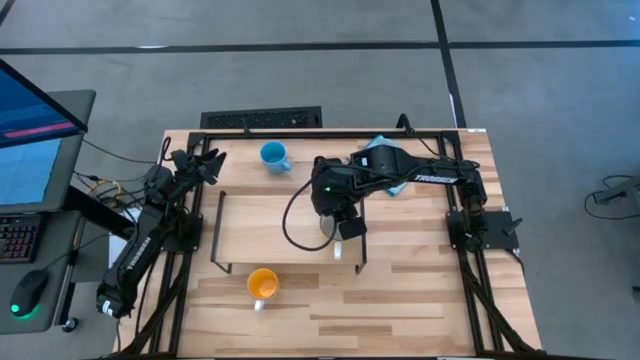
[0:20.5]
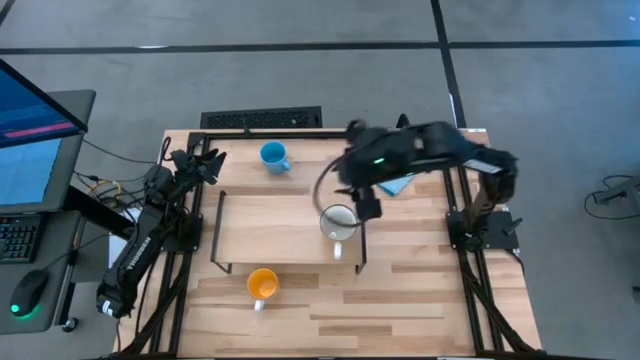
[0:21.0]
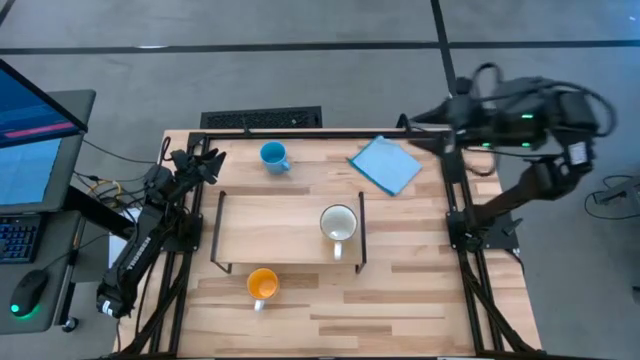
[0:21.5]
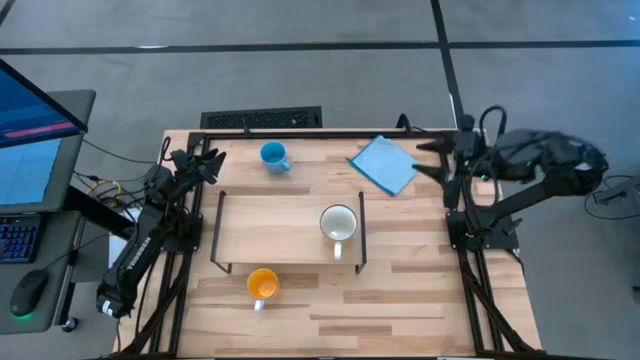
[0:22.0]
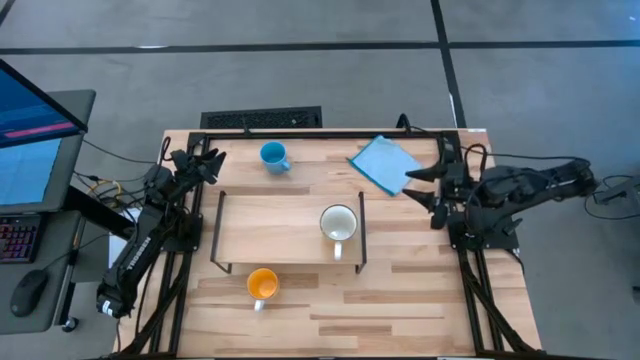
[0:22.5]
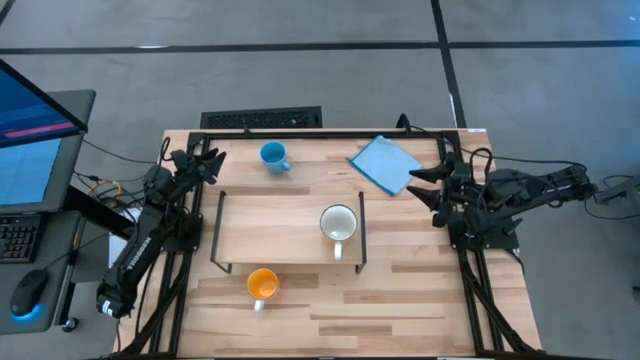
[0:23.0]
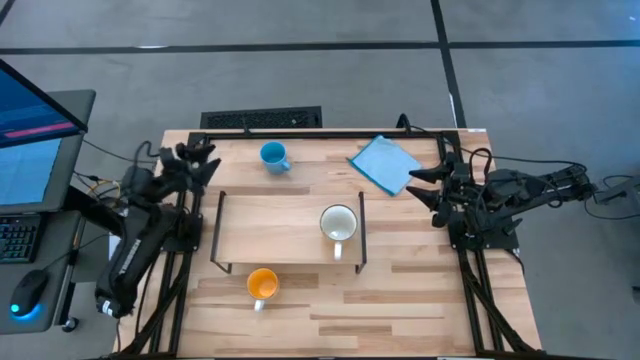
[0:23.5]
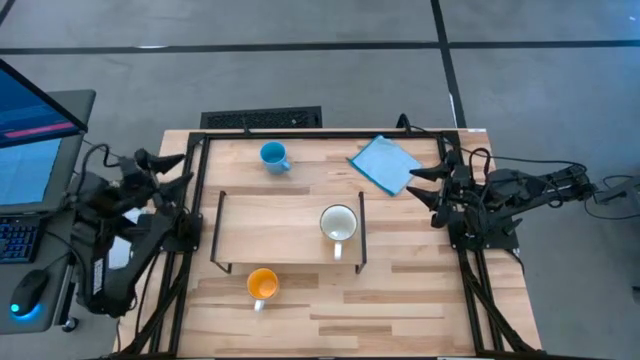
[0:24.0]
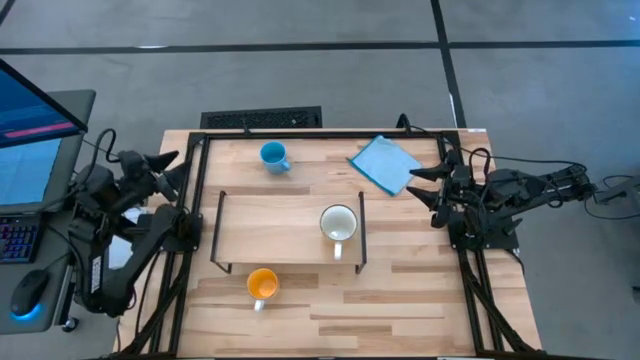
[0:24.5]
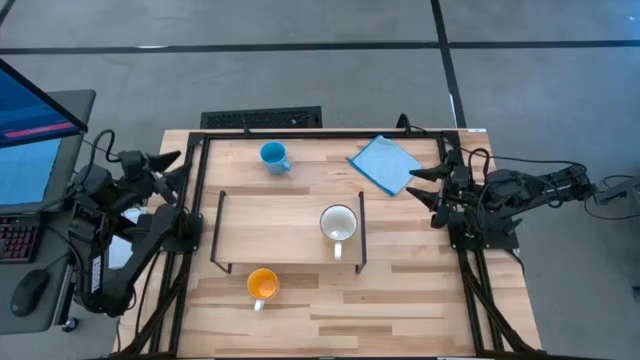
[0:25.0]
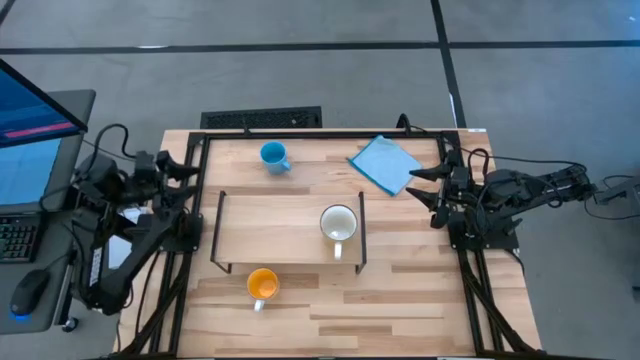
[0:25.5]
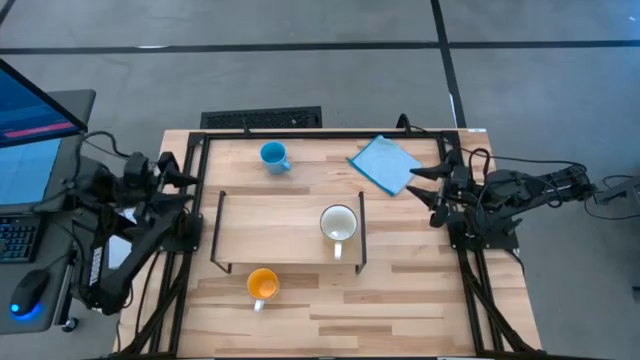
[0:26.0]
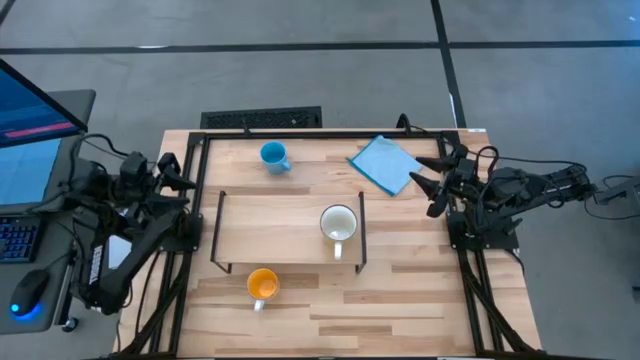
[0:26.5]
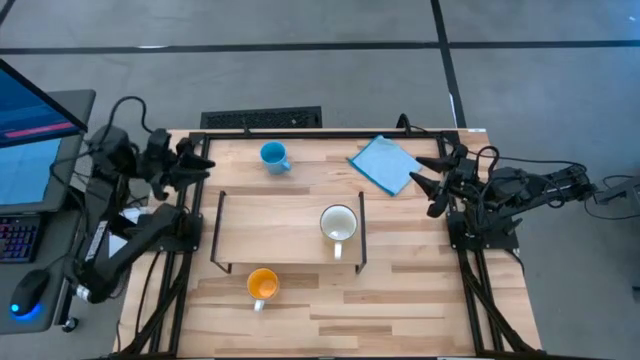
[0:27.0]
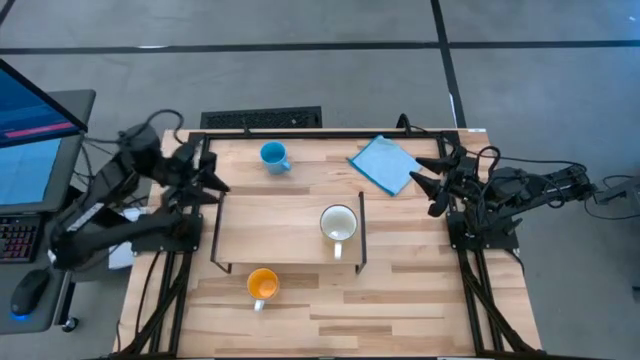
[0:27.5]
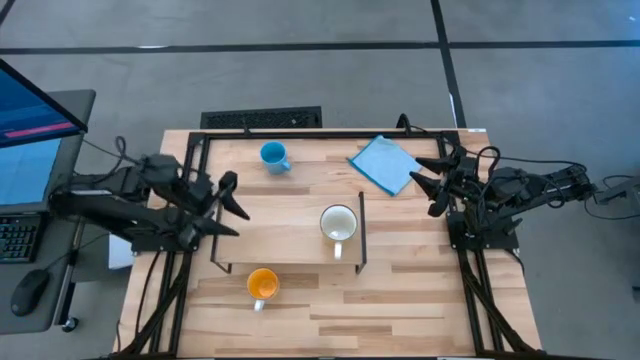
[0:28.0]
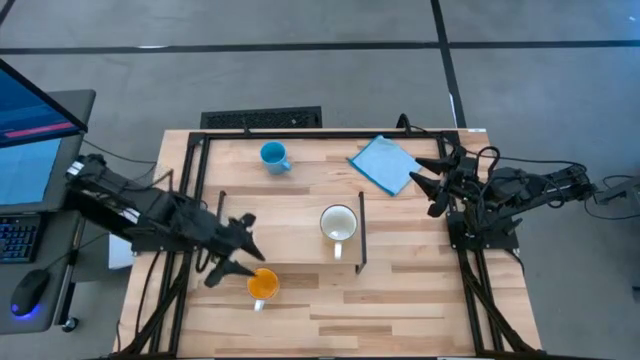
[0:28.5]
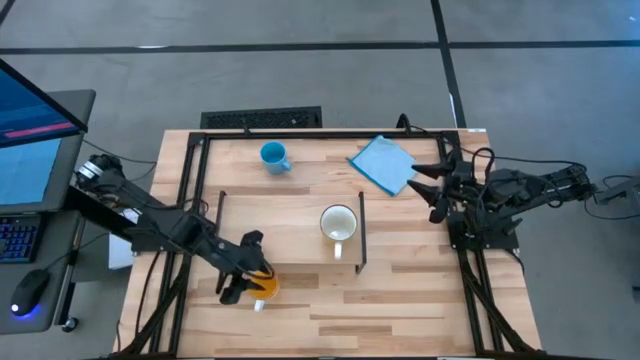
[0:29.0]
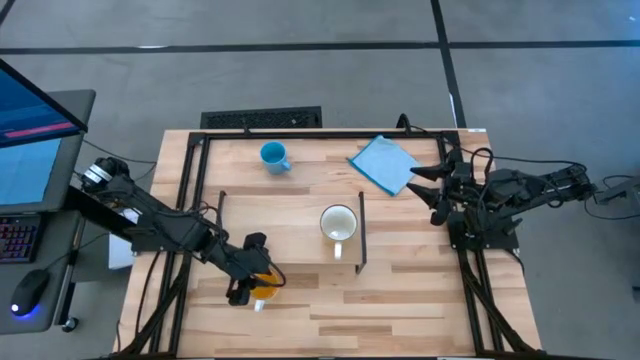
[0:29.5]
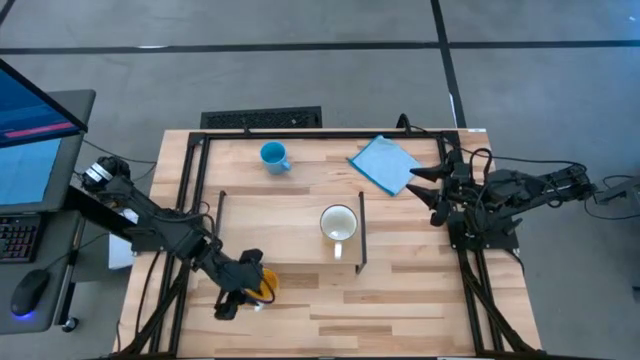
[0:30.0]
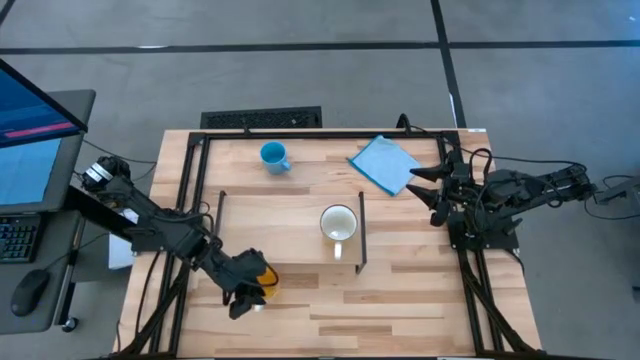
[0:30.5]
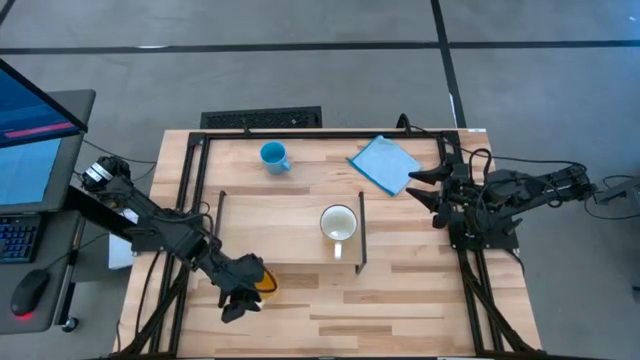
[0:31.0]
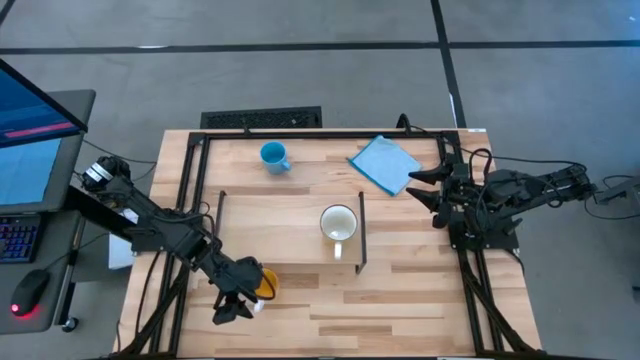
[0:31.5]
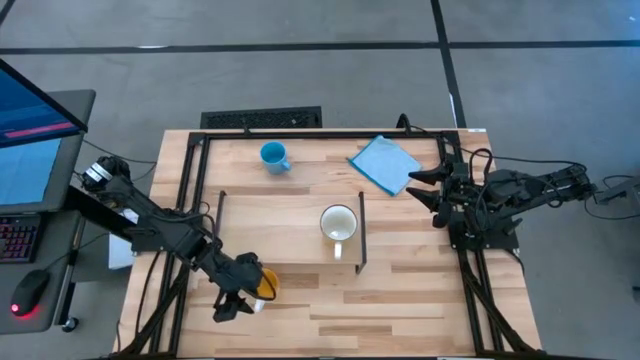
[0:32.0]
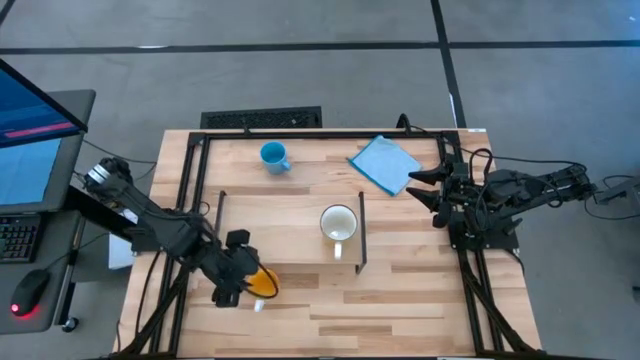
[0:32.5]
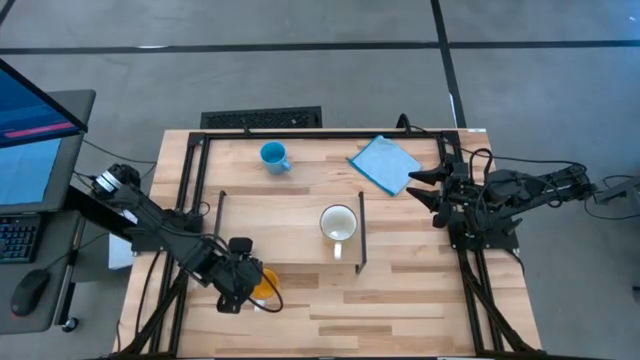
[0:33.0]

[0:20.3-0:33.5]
Task: Stack small to large cups/mugs on shelf
Put the dark yellow mug on the shelf

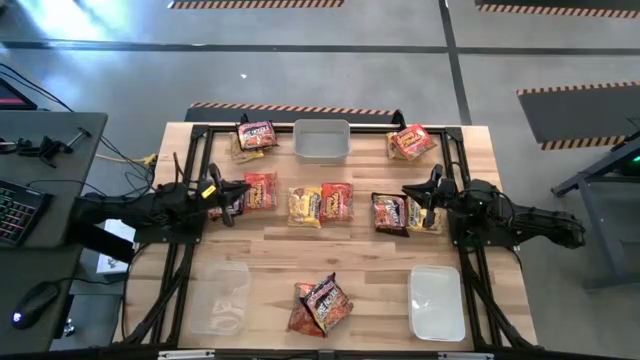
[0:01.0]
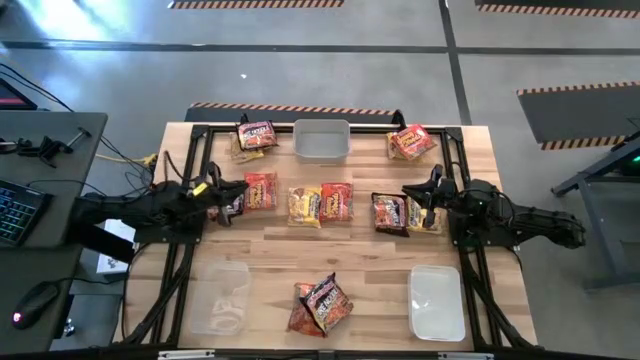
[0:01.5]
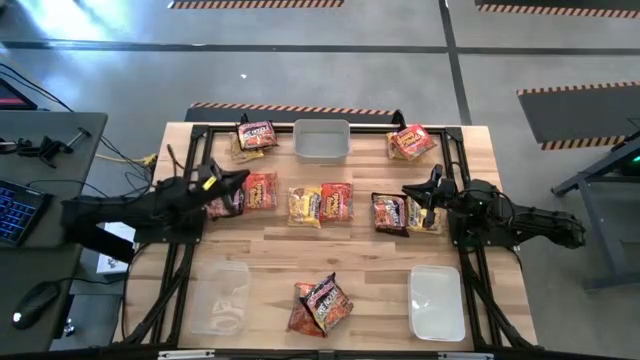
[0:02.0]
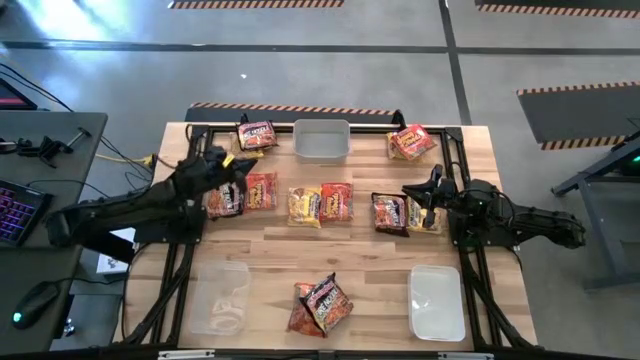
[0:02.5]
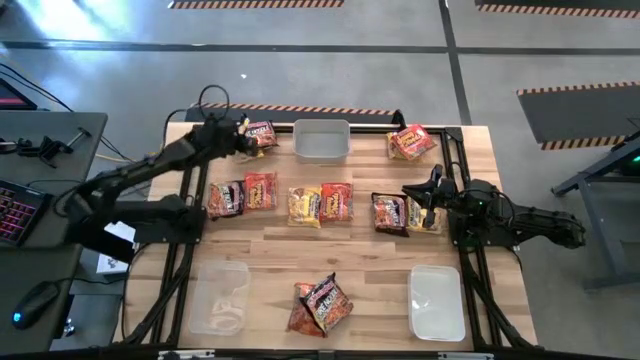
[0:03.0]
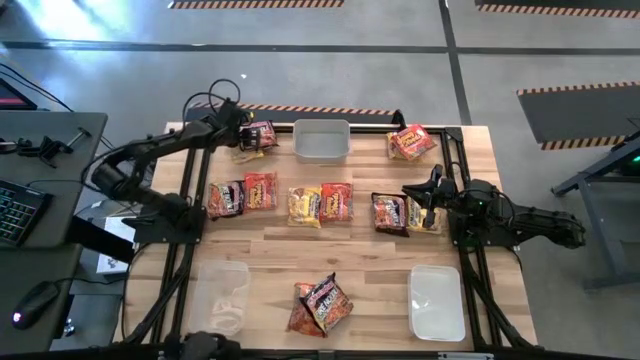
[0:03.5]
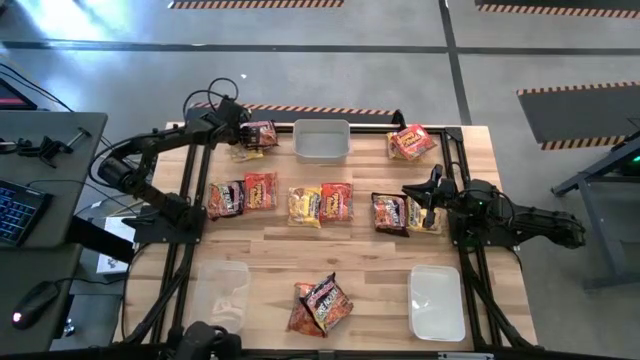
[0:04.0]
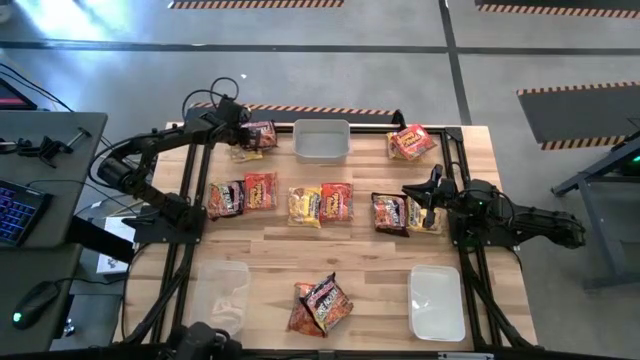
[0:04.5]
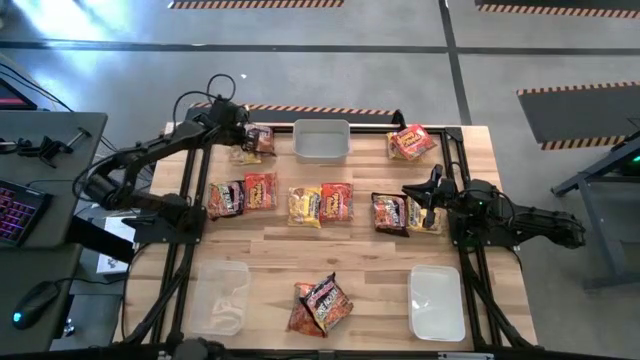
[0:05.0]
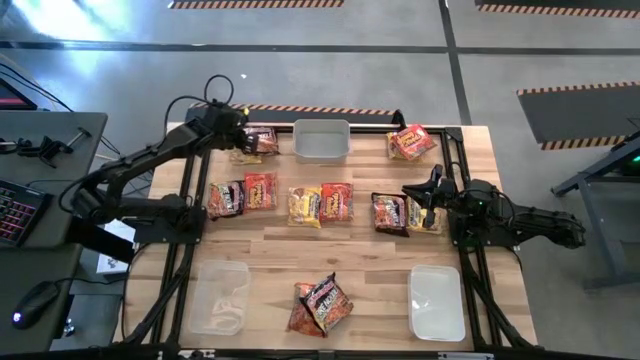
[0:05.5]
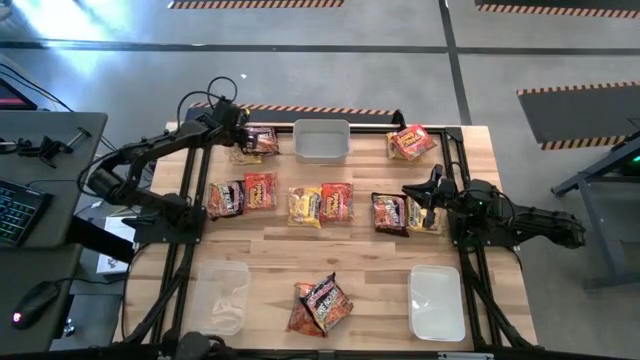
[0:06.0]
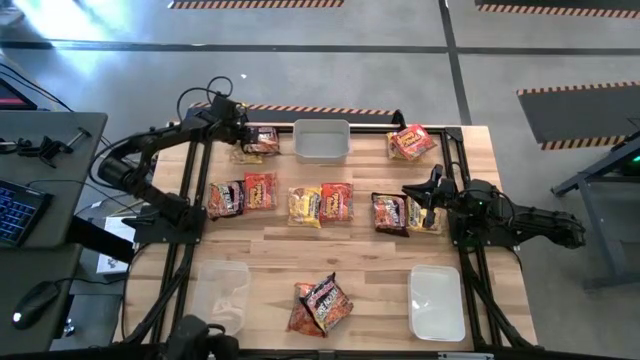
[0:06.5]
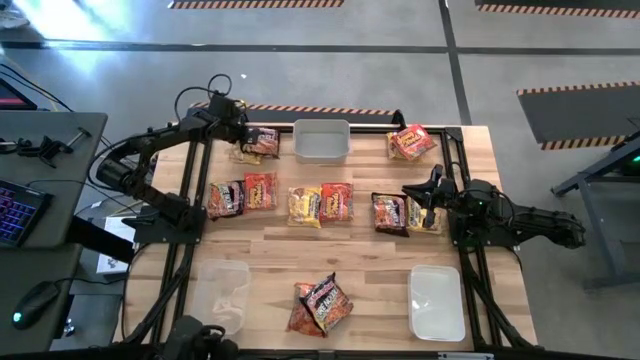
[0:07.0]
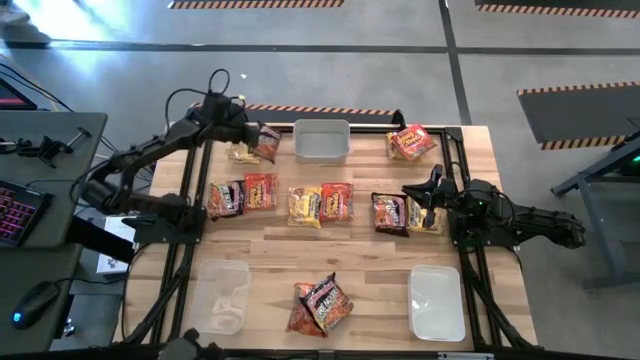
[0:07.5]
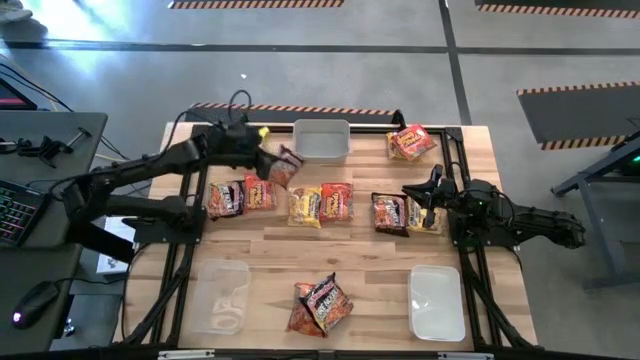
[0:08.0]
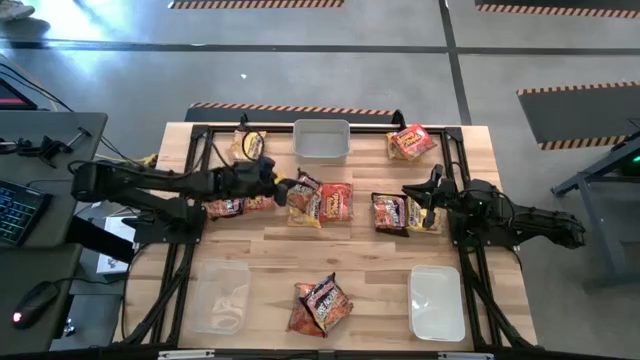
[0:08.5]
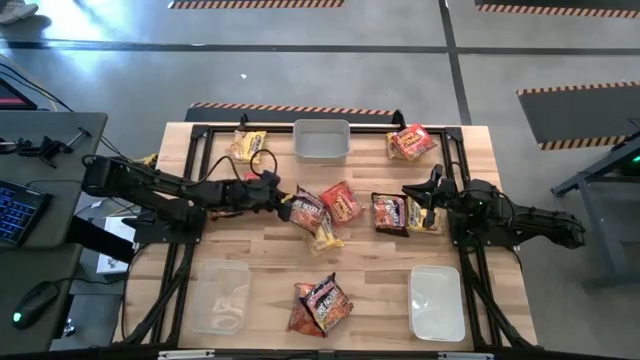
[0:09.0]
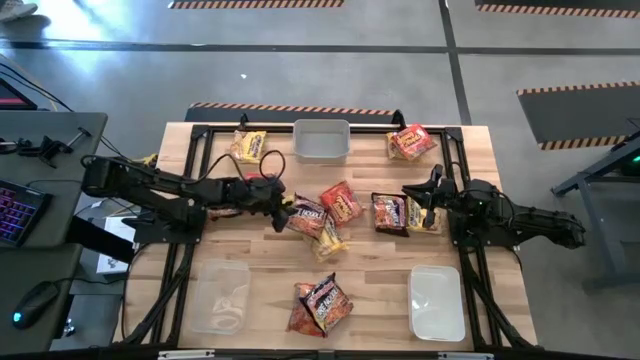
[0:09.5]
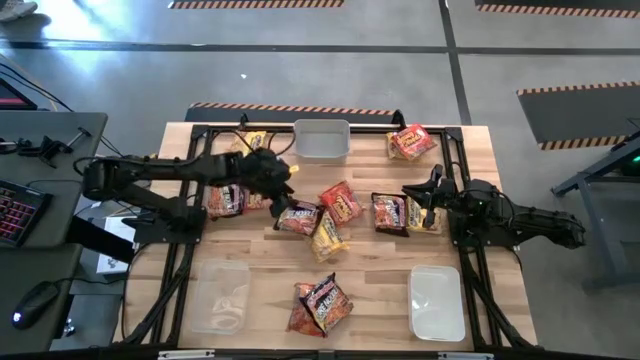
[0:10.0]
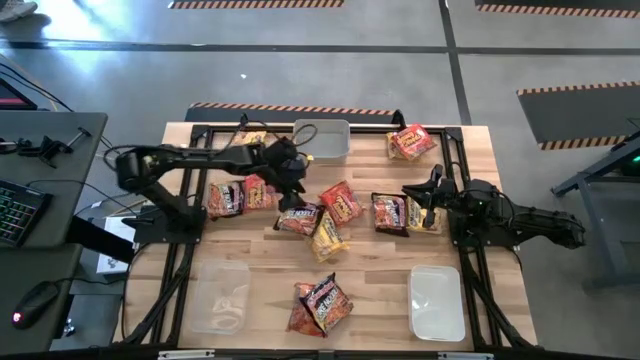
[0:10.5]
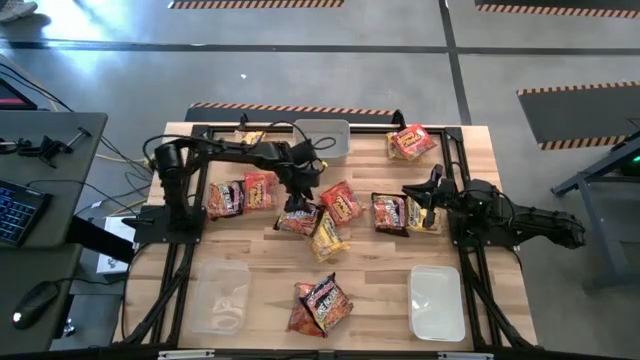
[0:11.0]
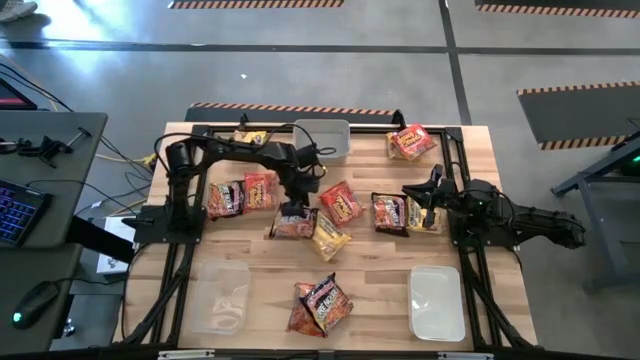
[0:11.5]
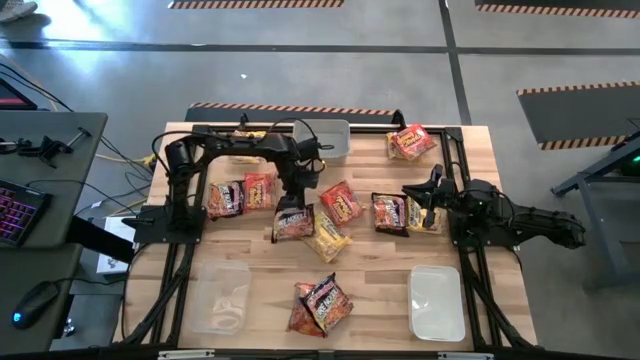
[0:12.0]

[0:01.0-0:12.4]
Task: Sort Maruchan noodles
Put the top left black noodle pack into the gray bin
